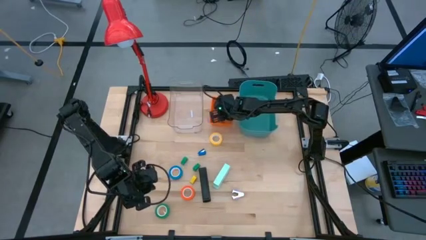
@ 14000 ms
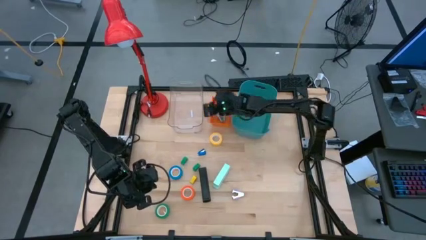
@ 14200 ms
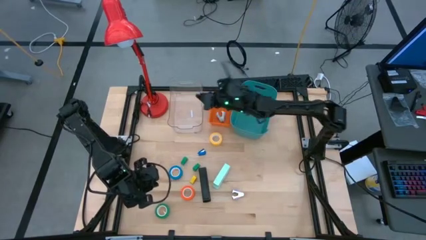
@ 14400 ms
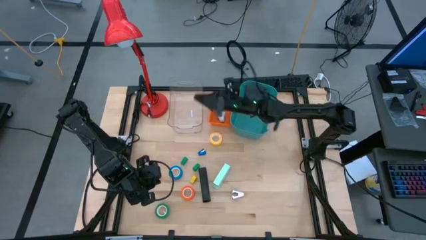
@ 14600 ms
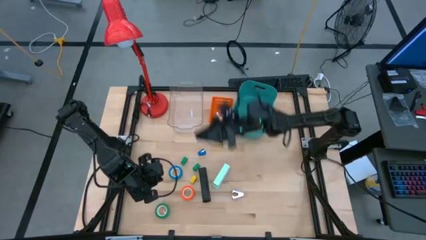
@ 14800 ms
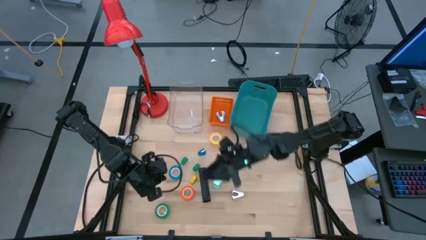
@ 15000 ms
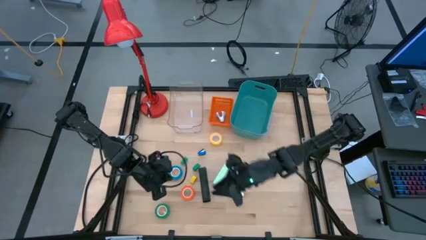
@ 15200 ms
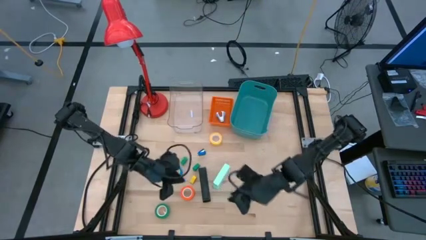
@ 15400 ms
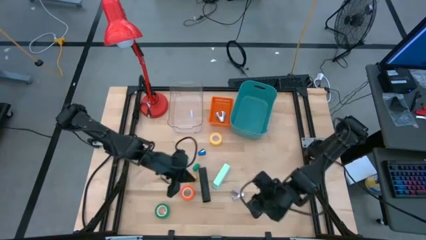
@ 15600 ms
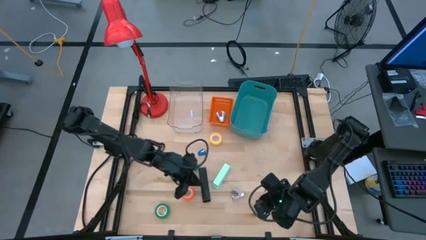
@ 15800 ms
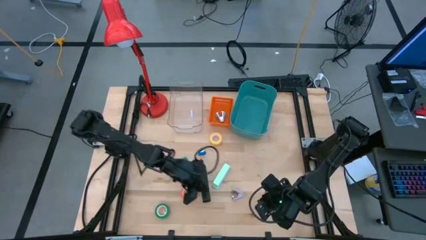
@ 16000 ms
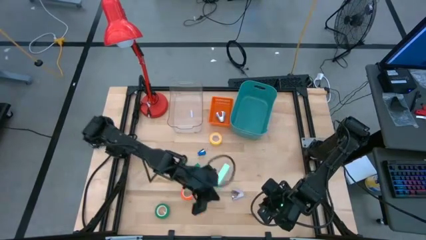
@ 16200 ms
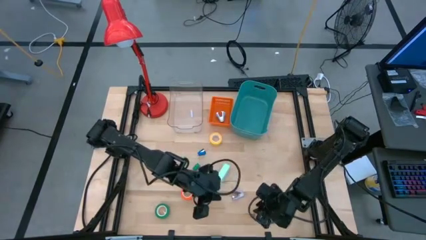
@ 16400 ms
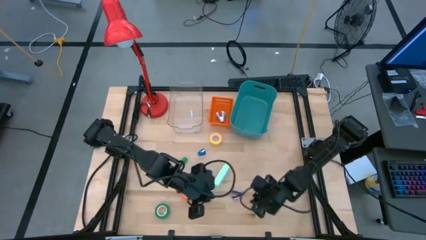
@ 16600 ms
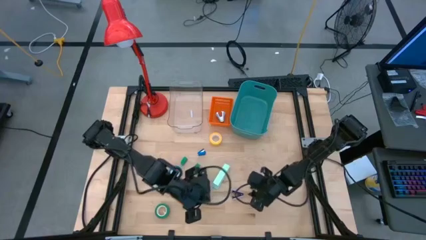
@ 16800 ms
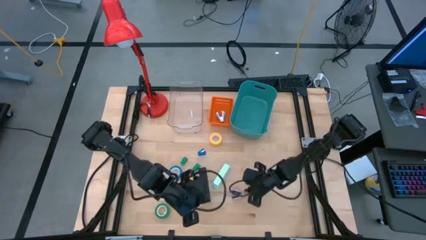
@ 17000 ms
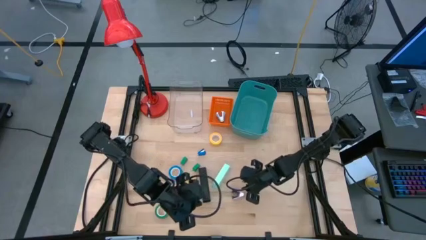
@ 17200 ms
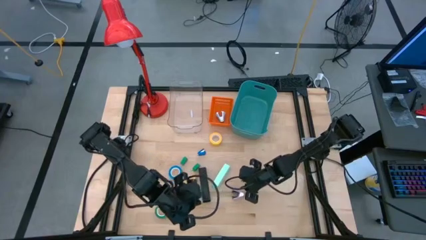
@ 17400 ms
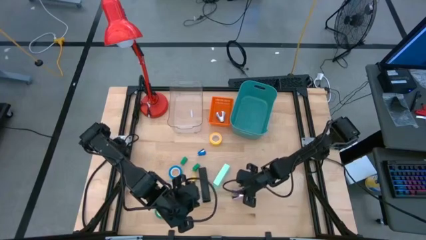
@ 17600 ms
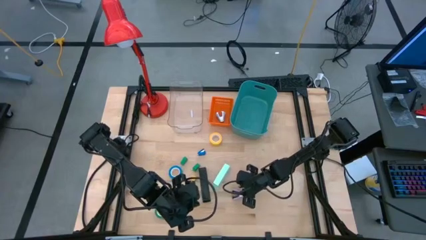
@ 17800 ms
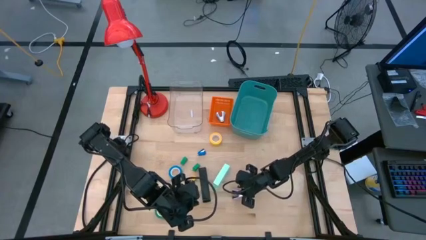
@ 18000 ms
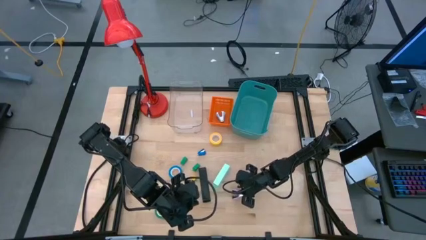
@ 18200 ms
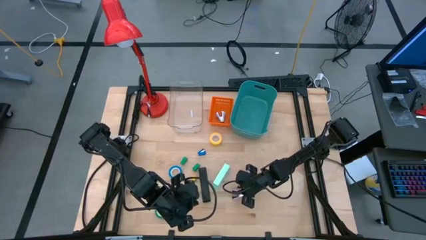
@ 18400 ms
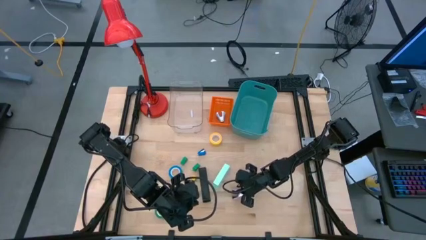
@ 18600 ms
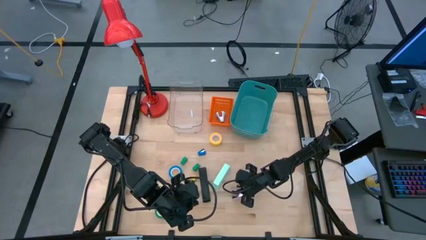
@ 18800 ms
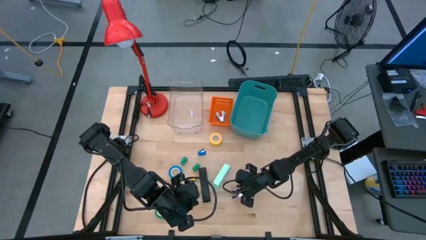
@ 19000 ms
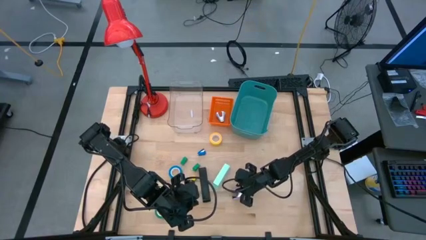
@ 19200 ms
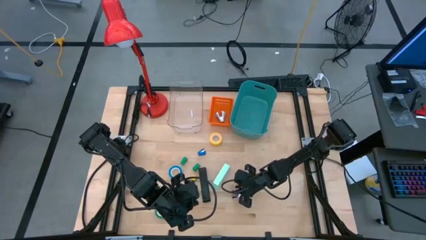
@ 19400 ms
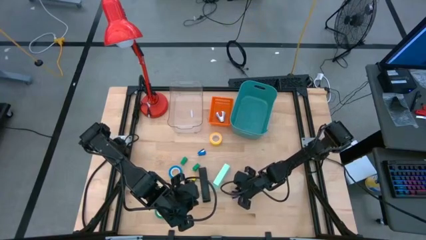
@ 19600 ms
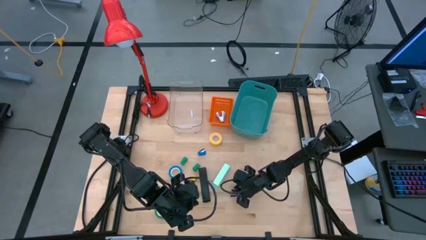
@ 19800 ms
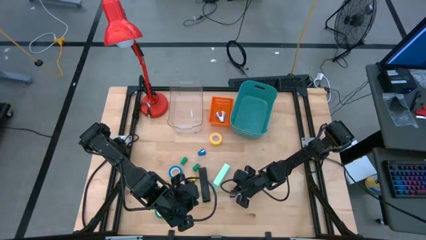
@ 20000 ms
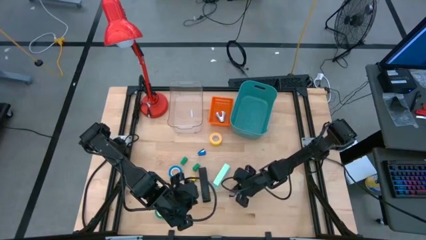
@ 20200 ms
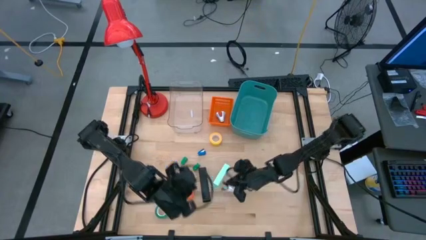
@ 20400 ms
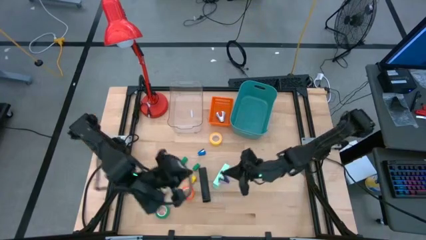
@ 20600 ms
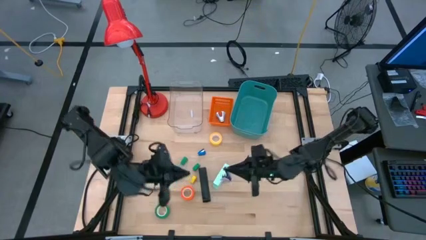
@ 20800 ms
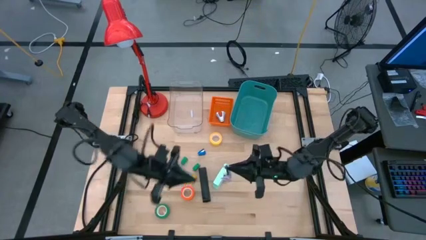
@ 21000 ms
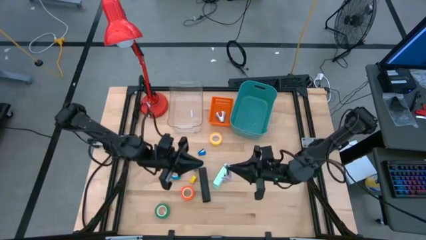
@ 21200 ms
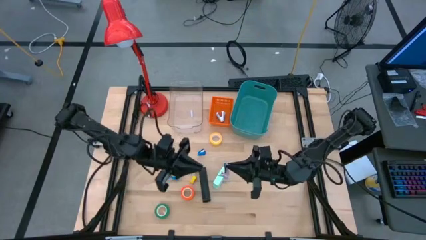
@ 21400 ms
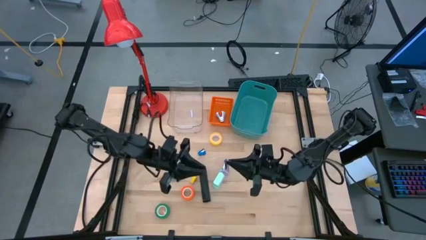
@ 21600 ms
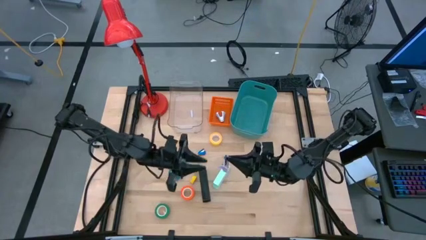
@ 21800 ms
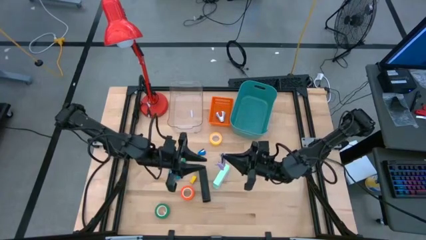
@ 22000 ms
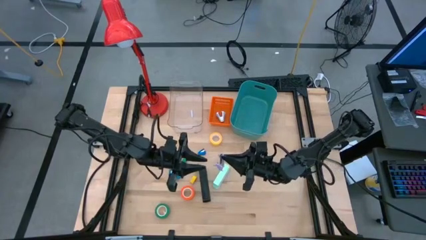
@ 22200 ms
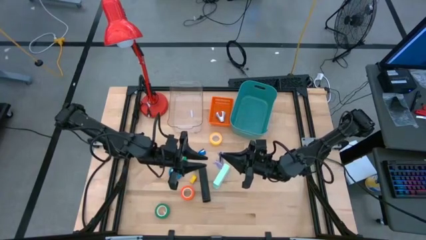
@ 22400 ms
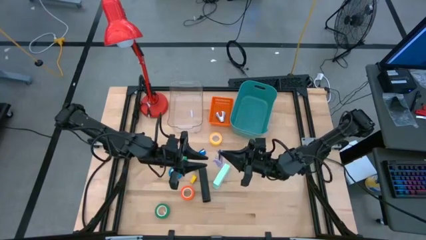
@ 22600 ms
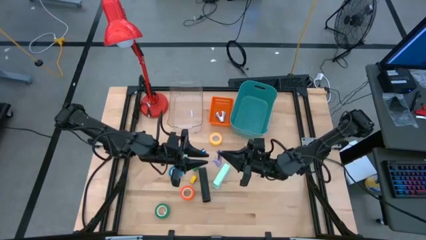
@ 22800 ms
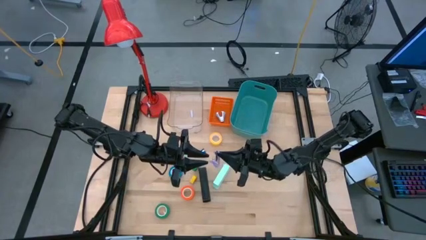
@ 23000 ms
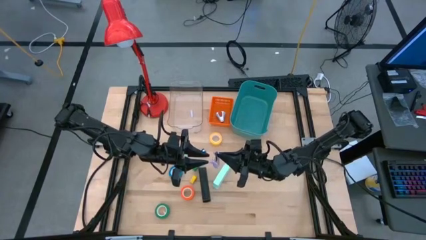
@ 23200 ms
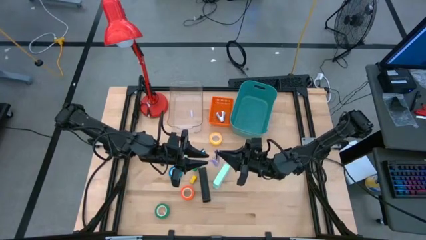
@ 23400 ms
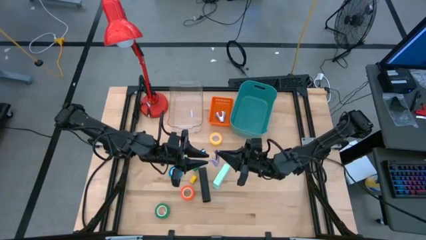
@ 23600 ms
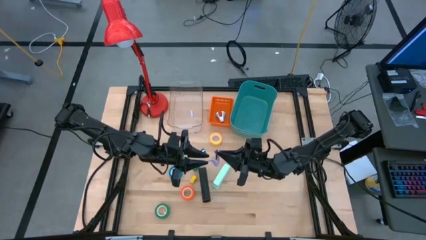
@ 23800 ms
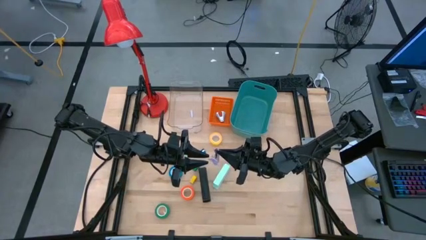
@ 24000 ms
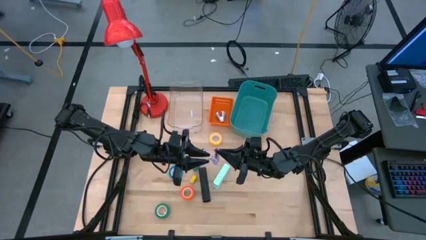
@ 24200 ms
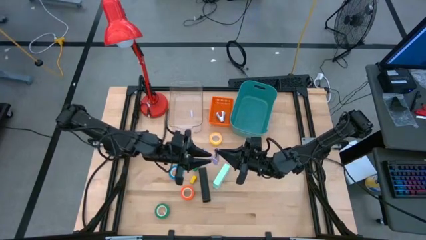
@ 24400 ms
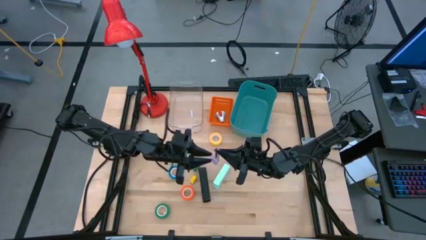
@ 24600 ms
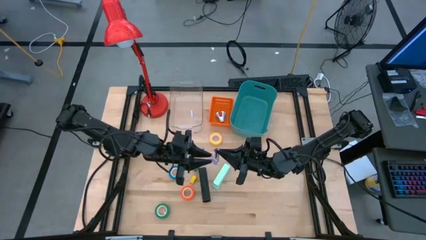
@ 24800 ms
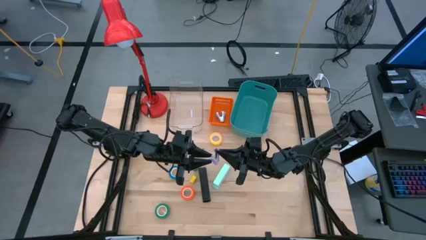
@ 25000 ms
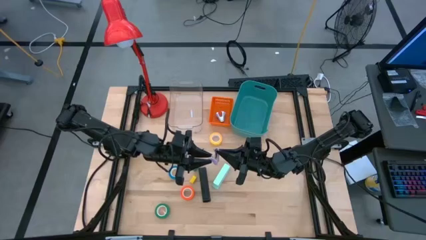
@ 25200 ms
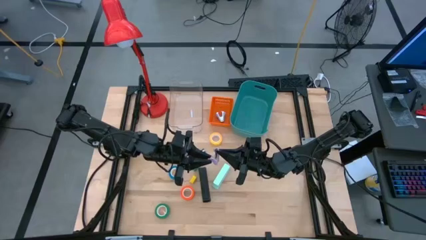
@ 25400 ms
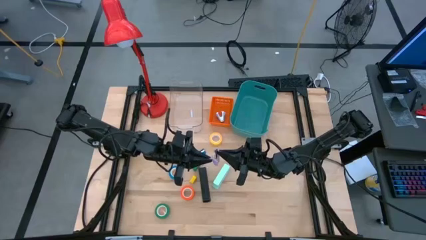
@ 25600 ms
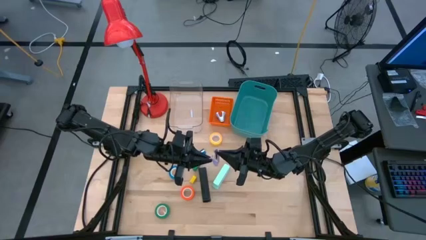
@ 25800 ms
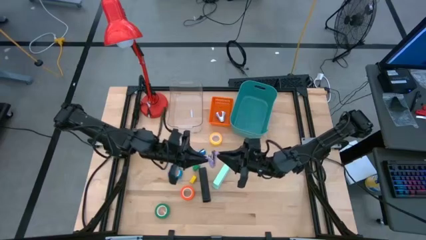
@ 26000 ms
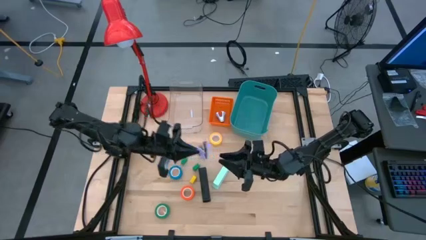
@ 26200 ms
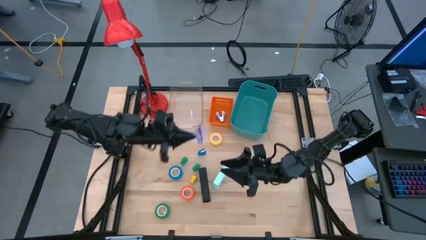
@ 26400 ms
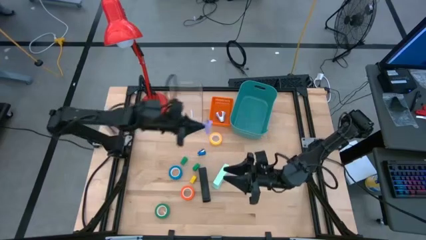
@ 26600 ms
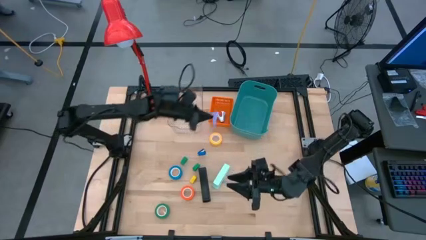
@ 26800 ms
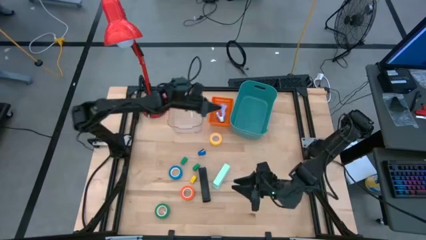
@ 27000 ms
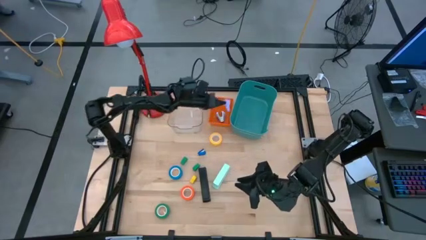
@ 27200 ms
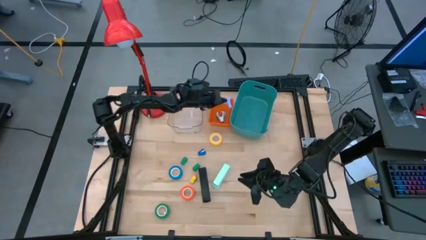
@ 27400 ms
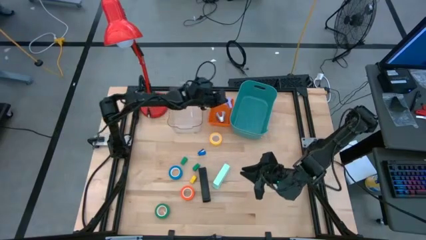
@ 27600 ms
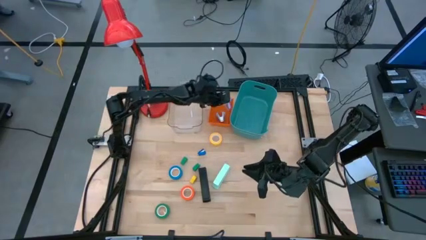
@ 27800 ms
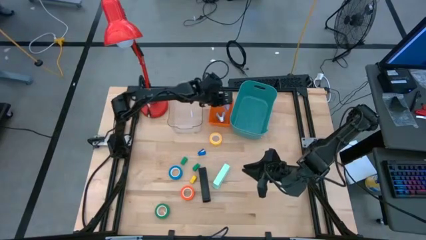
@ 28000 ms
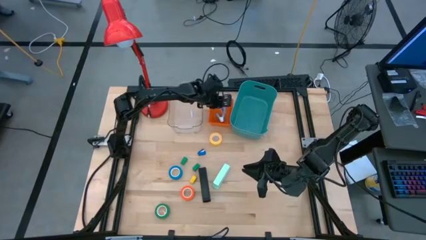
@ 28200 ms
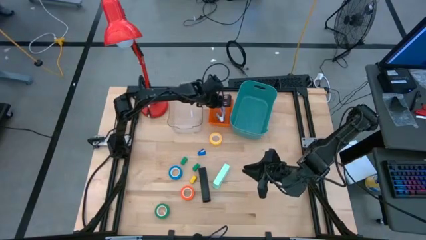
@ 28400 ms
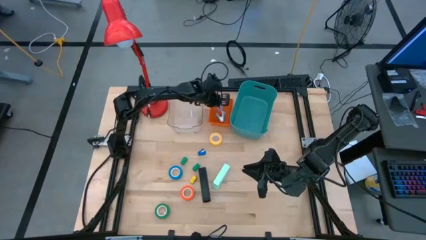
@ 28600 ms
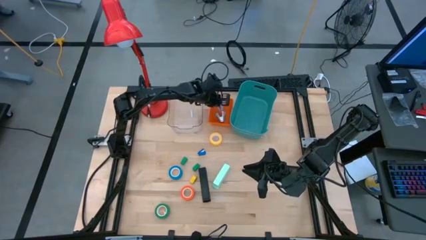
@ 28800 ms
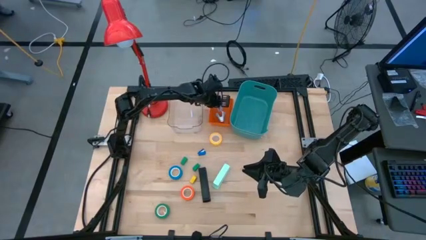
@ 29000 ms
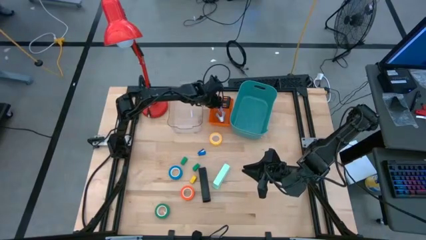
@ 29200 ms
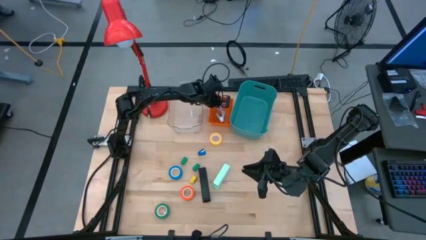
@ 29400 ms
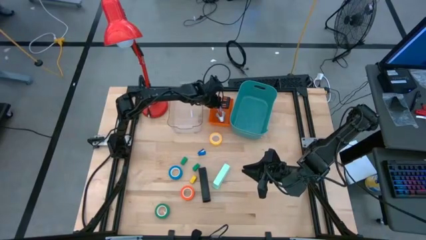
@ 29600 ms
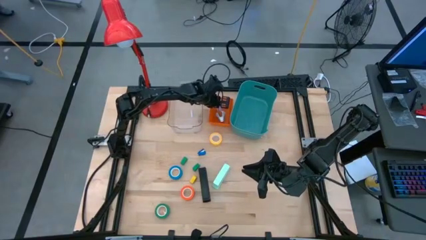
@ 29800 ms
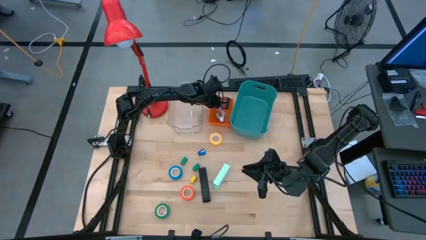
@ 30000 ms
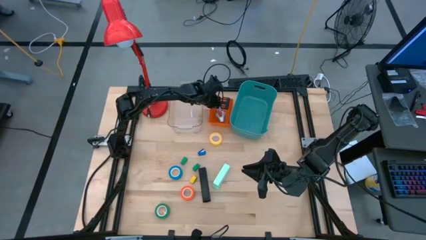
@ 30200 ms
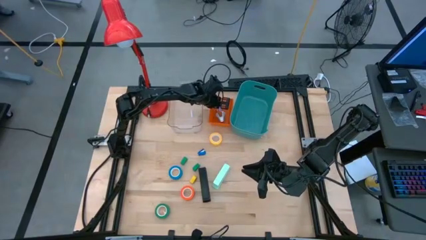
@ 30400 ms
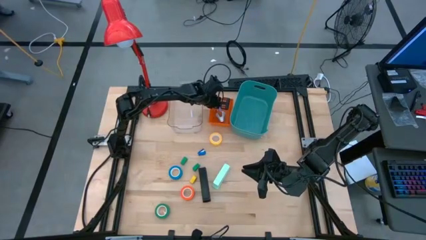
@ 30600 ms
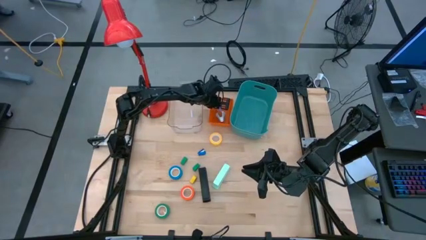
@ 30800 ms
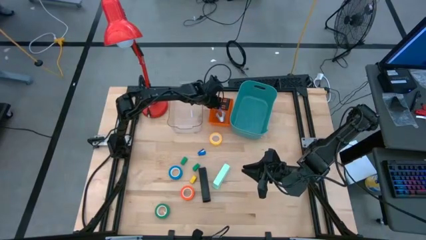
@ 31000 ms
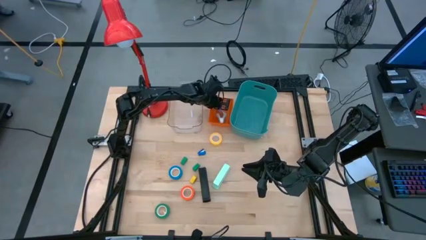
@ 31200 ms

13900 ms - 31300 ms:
Task: Pick and place Stapler, Stapler remover, tape
Put the violet staple remover into the orange bin
